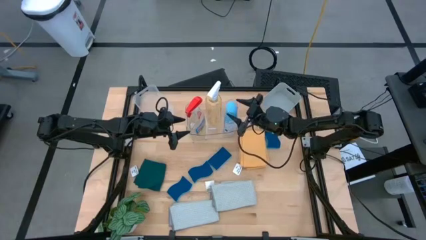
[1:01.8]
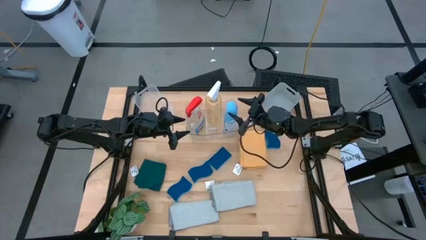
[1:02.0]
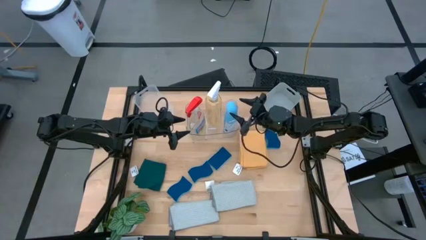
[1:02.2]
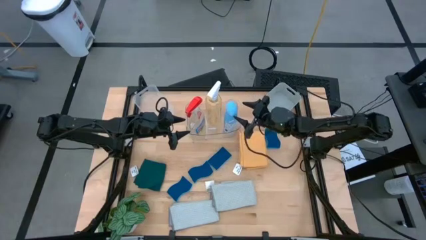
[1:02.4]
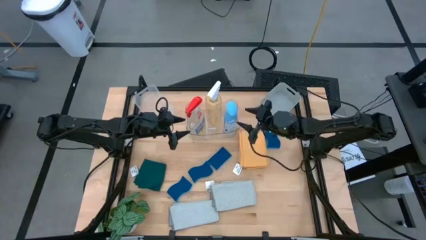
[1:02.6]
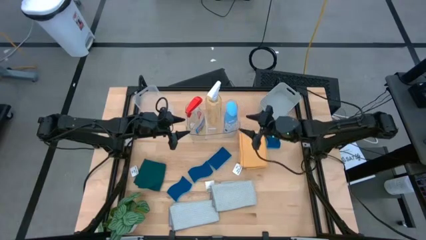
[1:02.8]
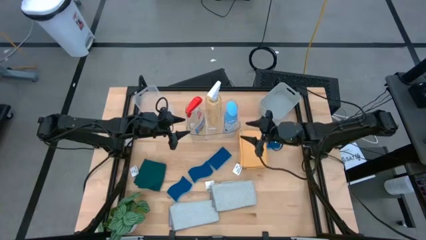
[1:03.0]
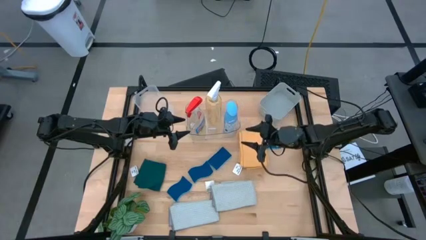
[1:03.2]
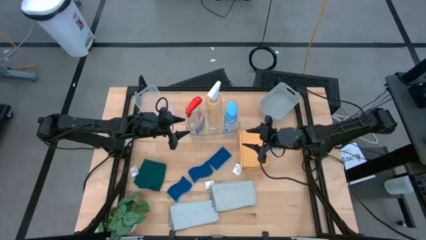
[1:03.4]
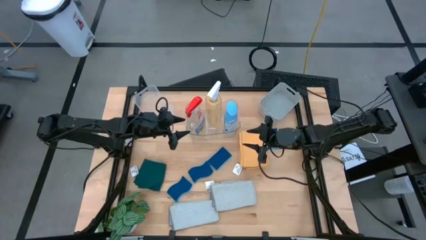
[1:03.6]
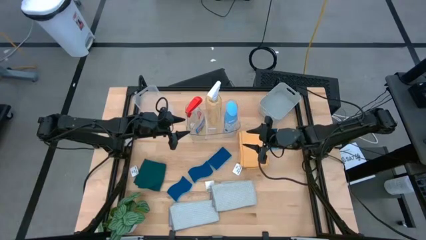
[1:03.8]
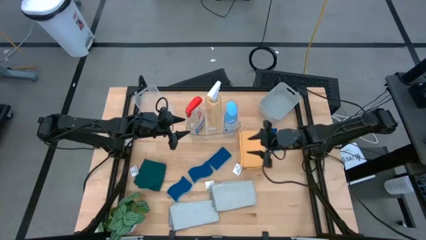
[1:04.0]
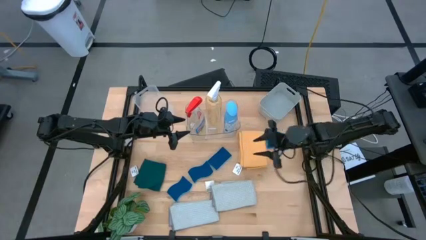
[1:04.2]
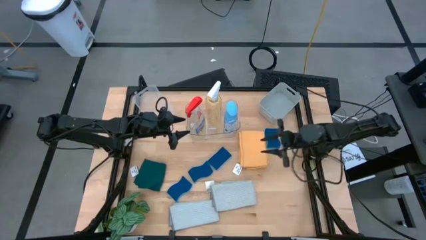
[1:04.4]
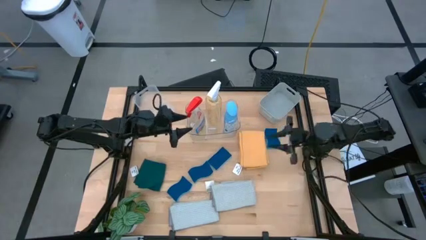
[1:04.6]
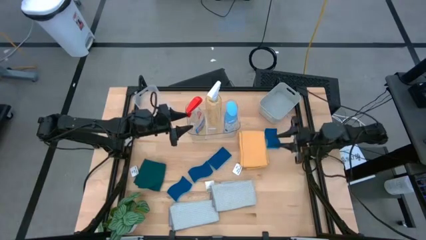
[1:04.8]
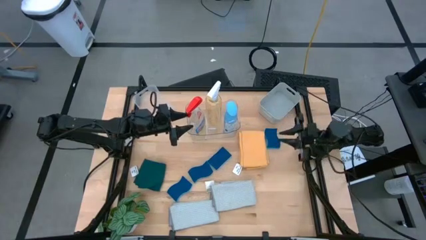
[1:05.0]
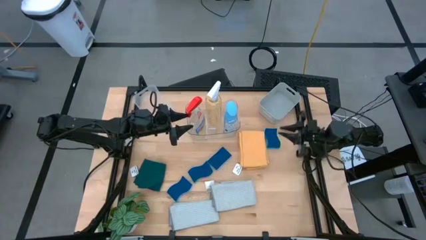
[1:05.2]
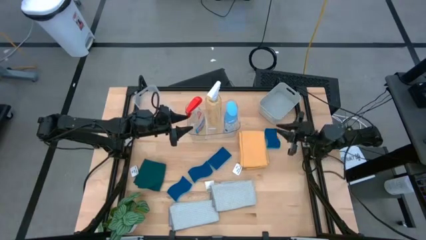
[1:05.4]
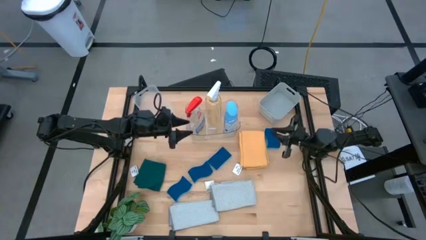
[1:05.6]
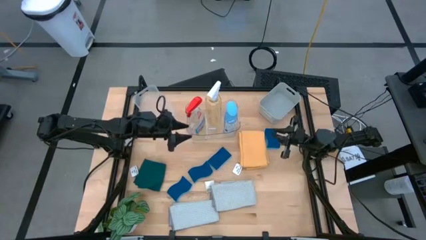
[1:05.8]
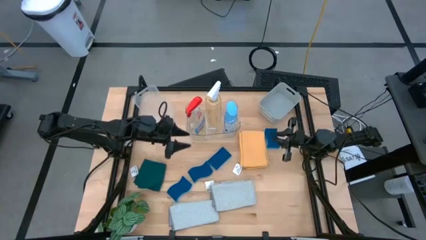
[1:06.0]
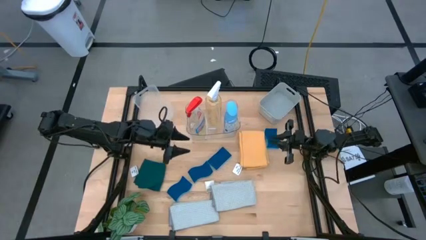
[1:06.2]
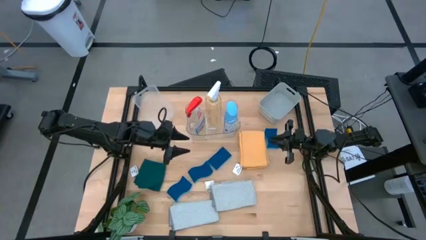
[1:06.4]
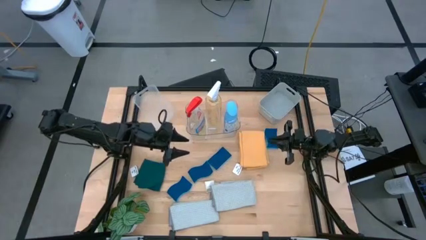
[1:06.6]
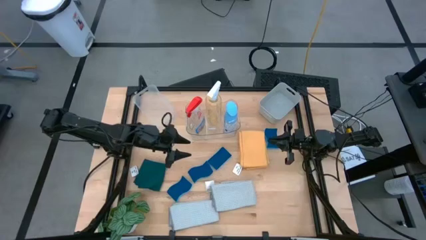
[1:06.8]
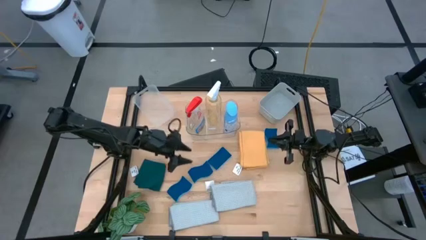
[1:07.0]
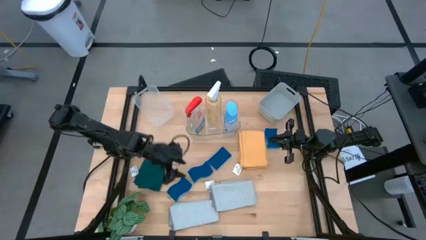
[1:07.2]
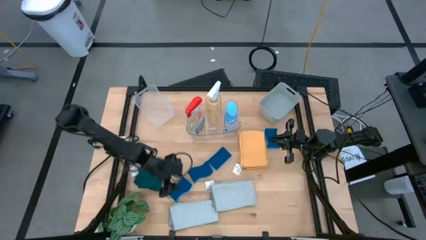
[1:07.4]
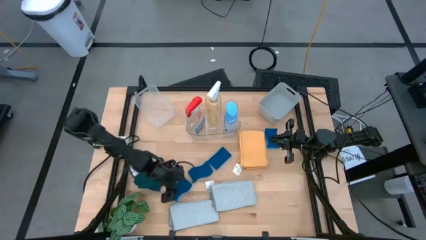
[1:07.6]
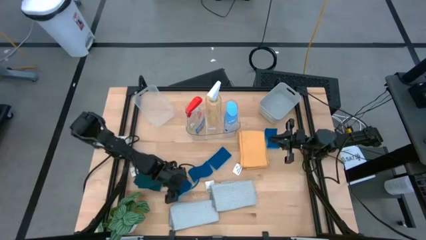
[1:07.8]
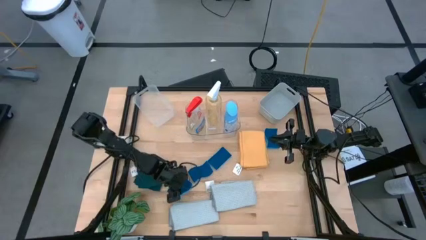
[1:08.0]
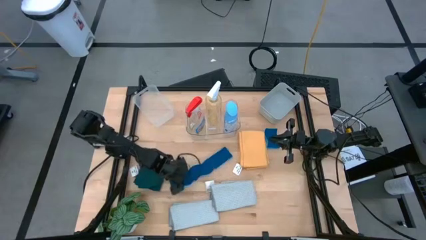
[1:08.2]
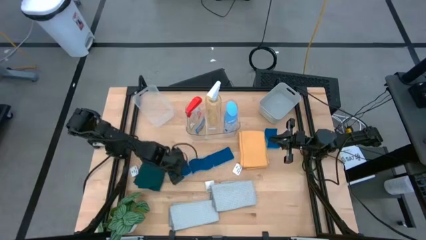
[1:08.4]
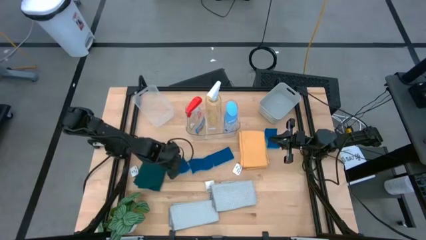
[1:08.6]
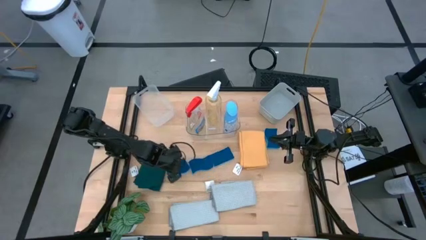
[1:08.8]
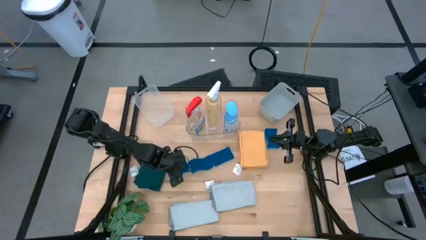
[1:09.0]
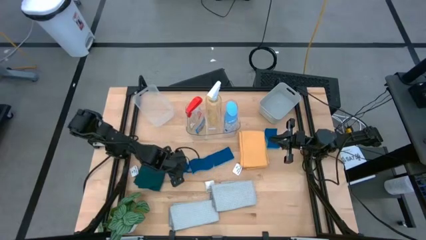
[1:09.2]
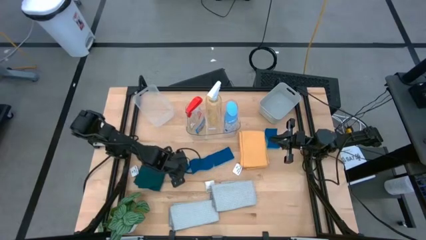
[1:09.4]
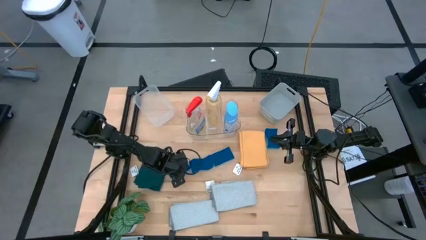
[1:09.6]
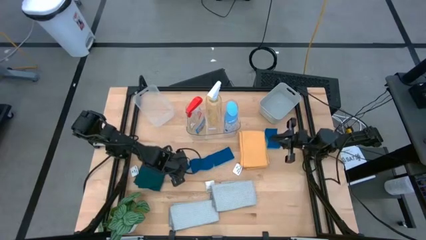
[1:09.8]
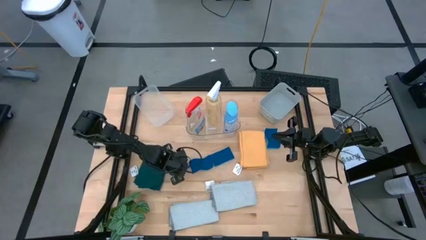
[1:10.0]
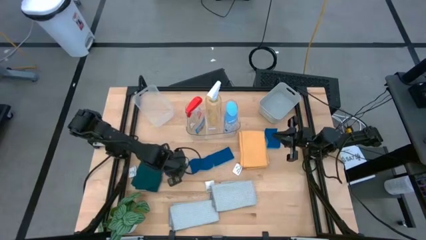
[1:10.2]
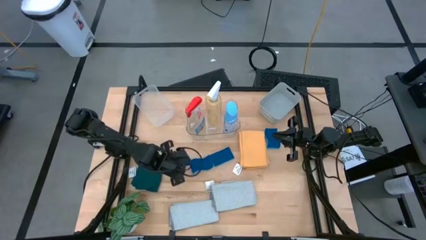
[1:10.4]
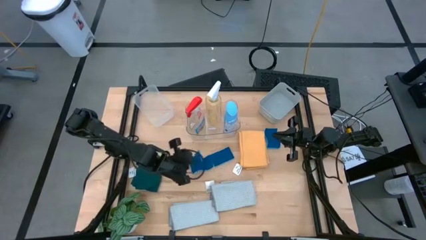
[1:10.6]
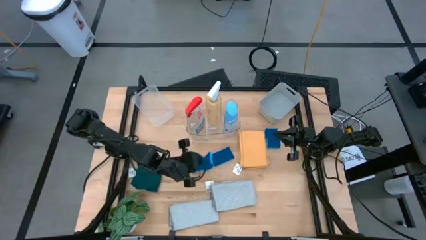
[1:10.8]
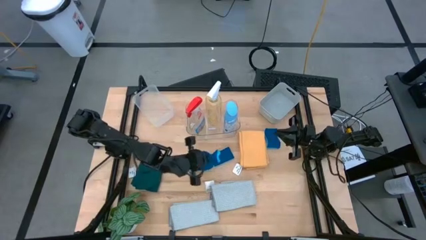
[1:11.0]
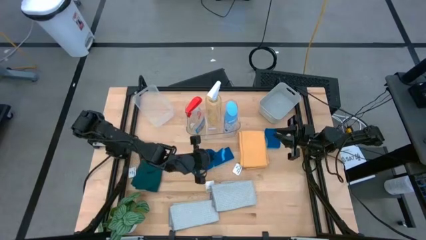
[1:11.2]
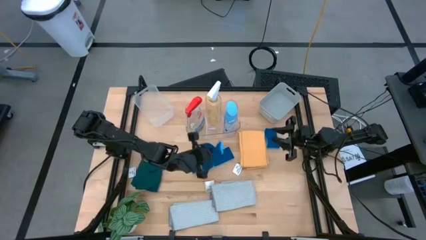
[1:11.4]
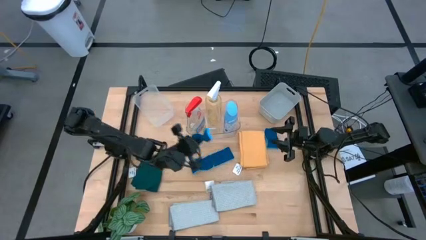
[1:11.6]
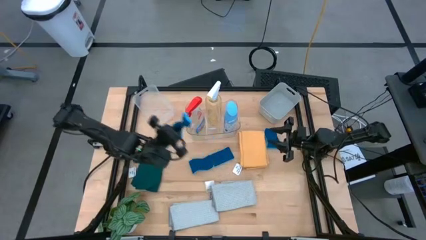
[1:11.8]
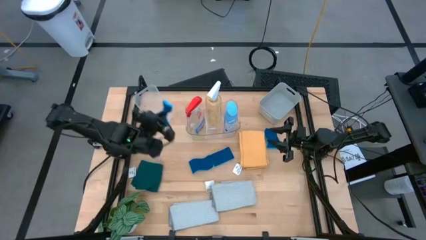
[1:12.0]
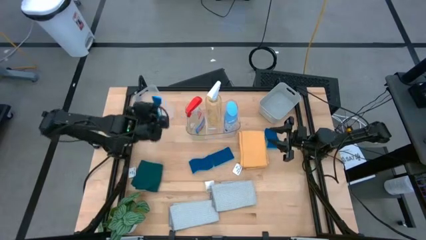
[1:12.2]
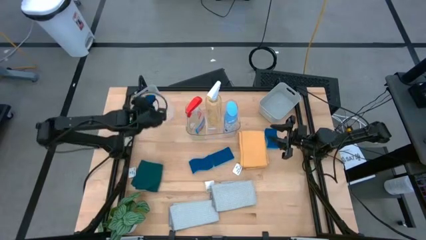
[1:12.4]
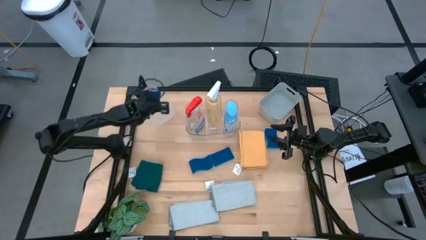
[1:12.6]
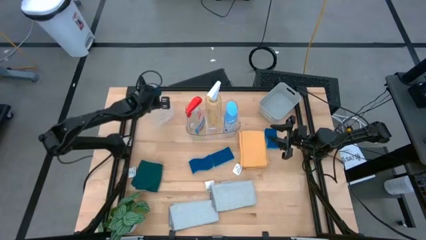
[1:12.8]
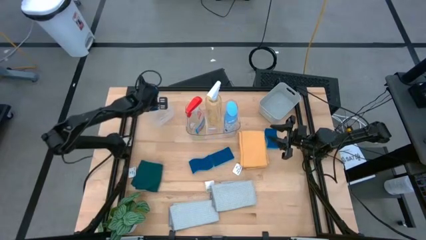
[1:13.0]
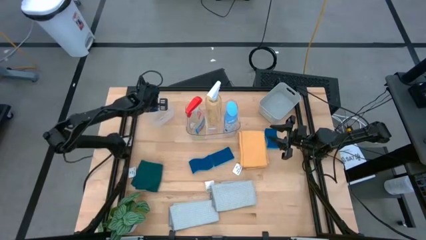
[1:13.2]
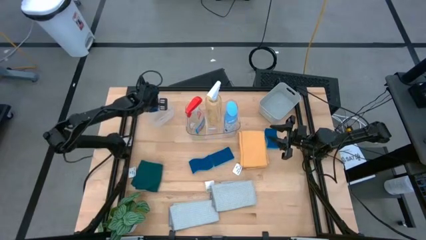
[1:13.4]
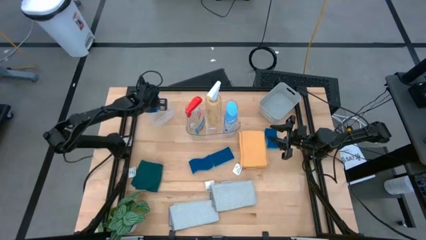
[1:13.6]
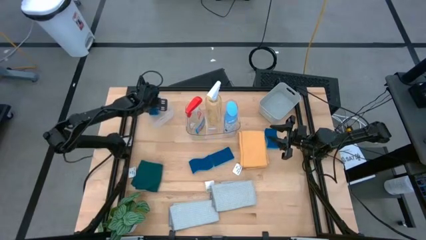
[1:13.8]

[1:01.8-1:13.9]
Task: Pick & Place Kitchen Items
Put the blue sponge into the white bin
